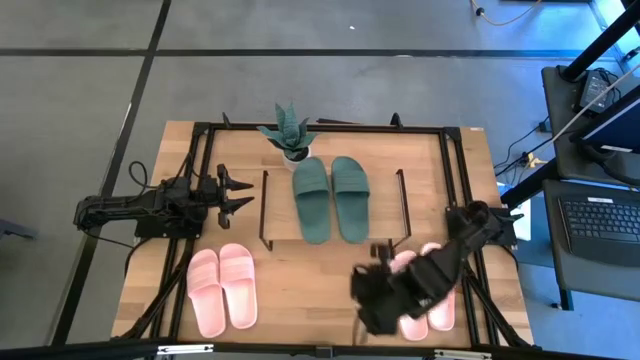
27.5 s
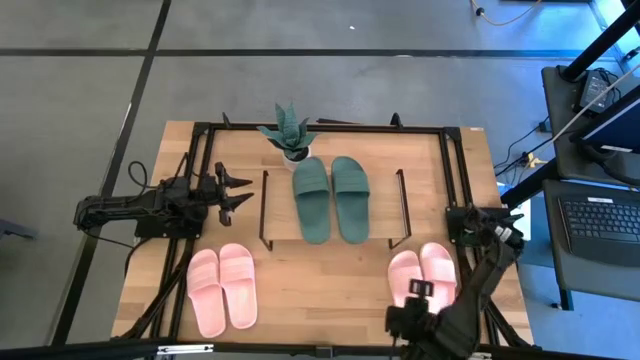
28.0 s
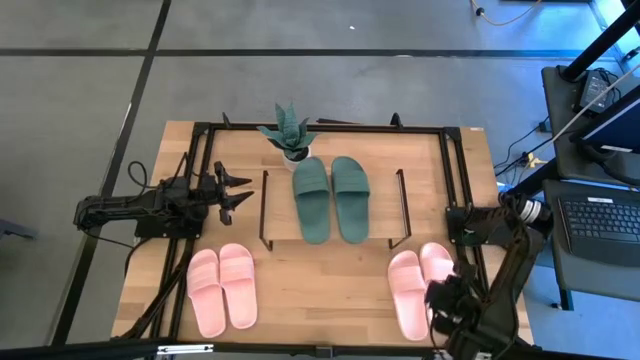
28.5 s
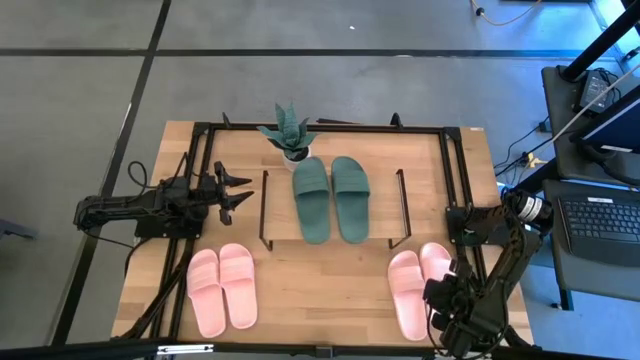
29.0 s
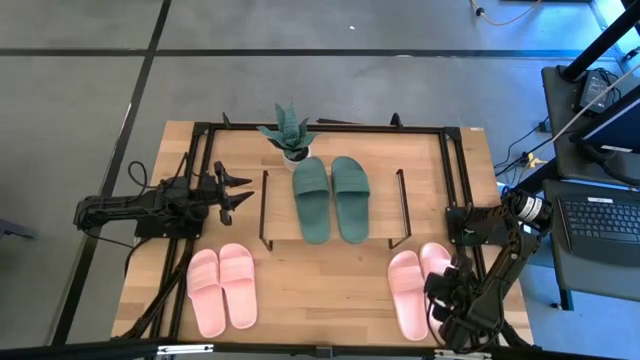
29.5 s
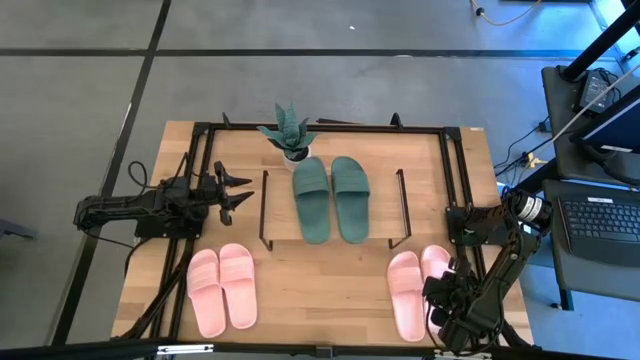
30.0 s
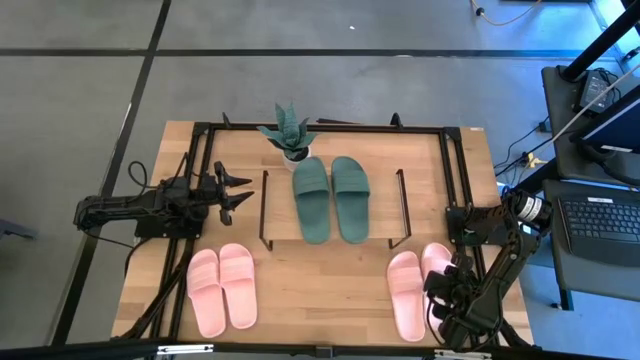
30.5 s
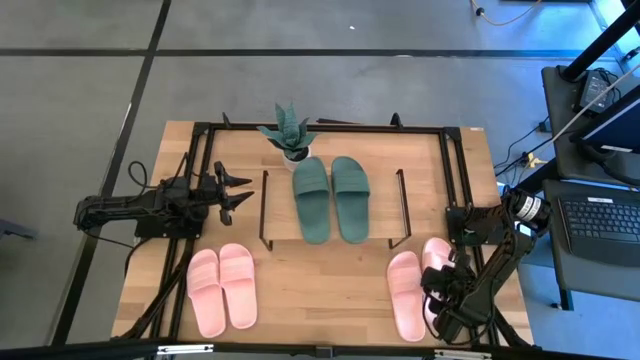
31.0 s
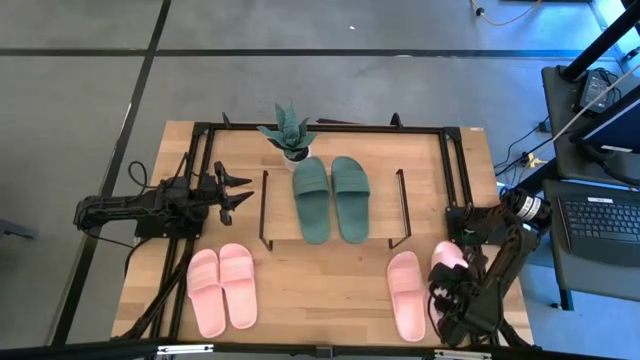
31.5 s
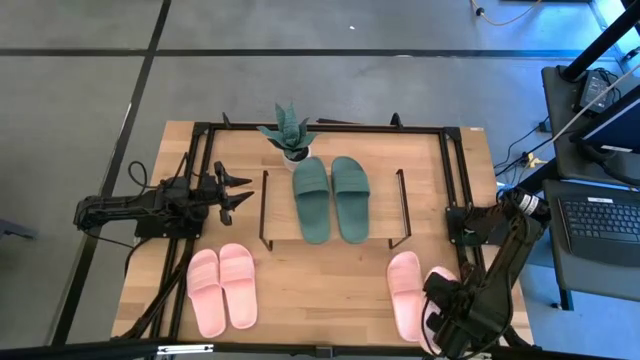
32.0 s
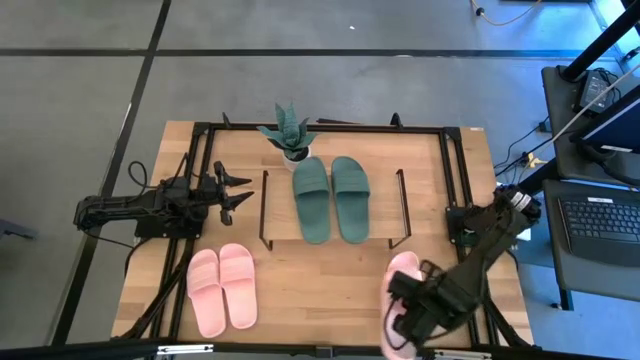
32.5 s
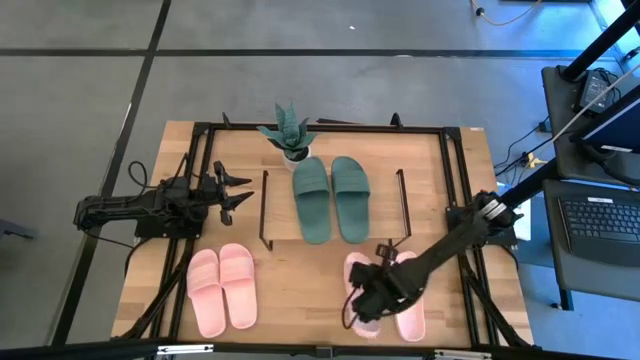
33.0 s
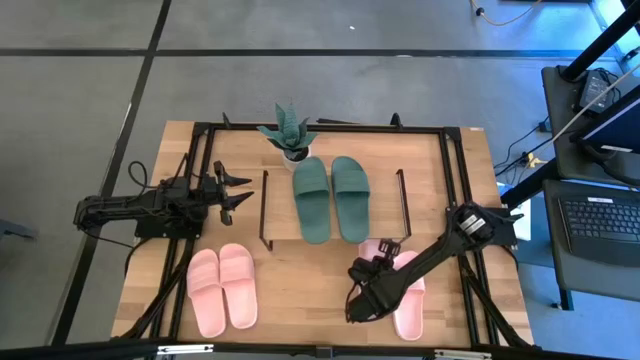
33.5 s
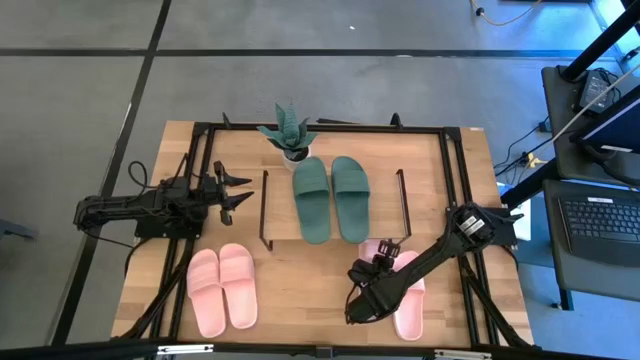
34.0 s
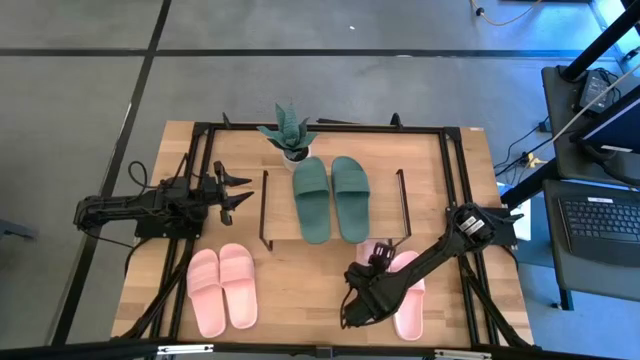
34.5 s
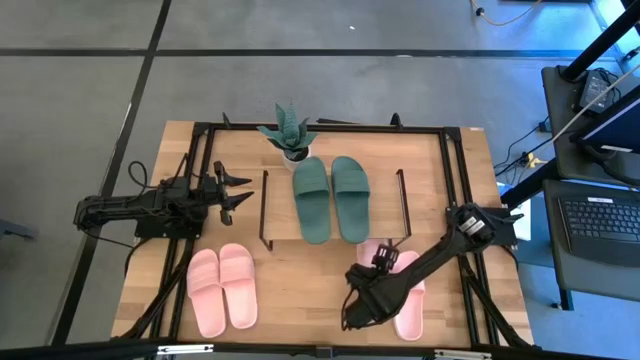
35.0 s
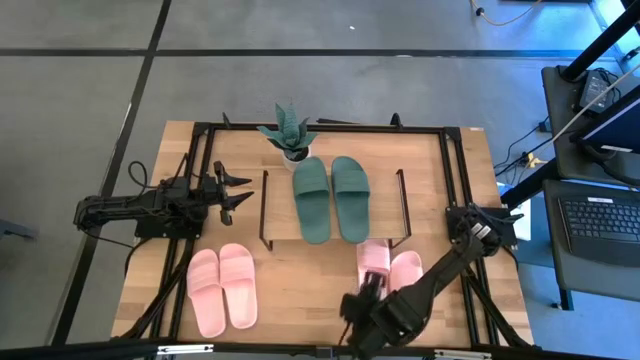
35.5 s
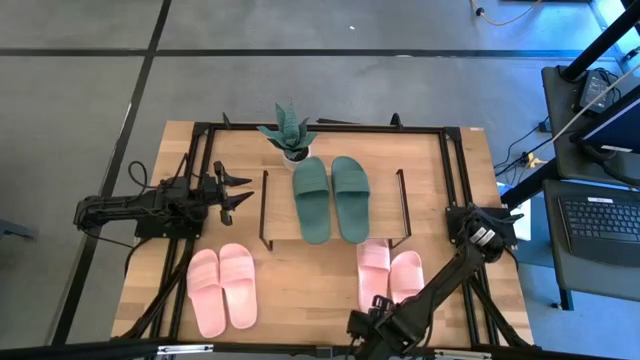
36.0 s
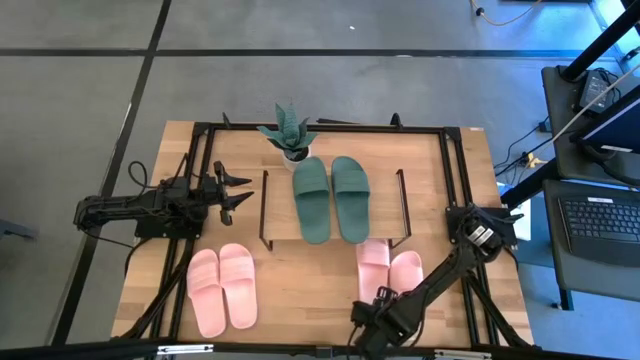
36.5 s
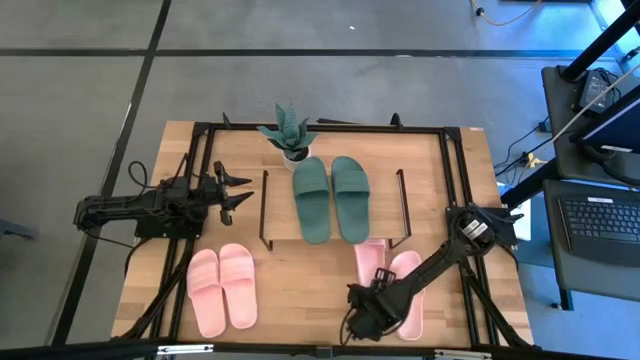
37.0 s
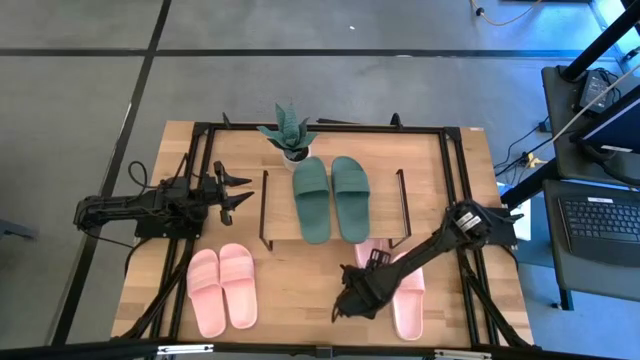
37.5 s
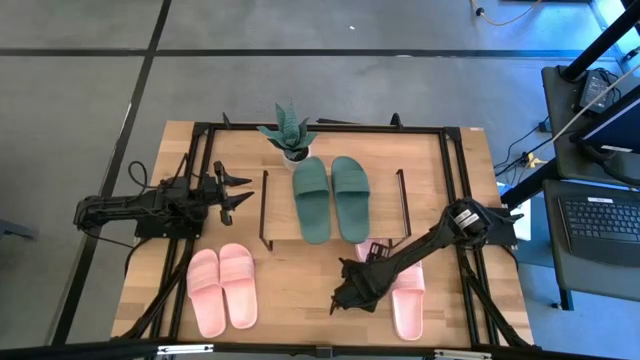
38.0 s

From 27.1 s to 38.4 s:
Task: Pick and place slides into the shelf
Put the right pink slide under the shelf

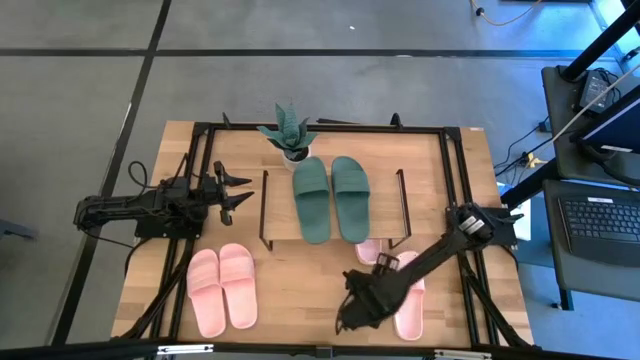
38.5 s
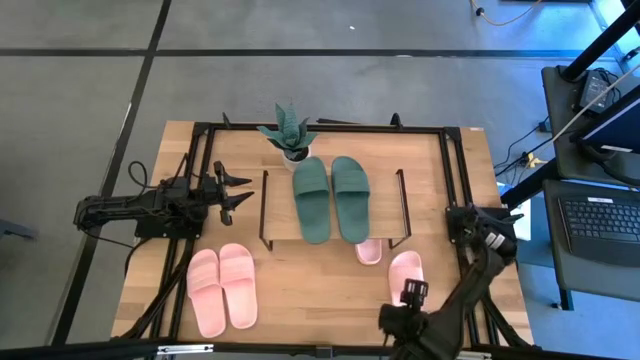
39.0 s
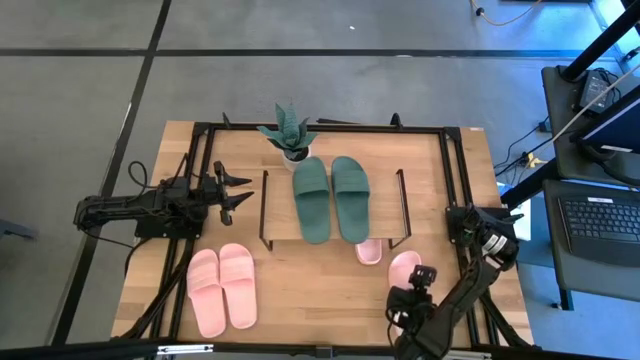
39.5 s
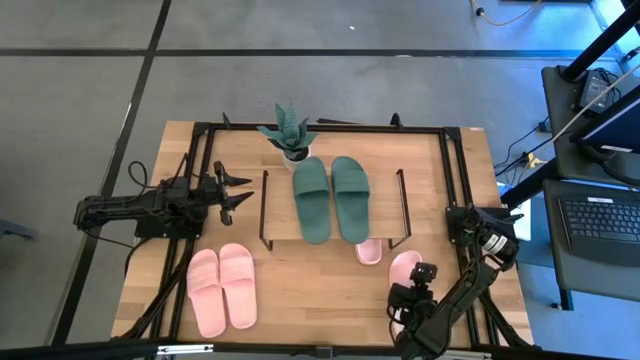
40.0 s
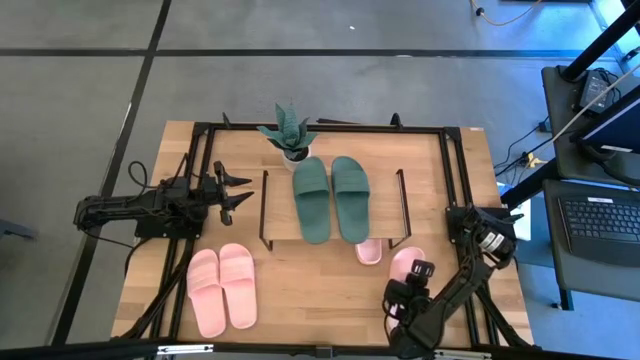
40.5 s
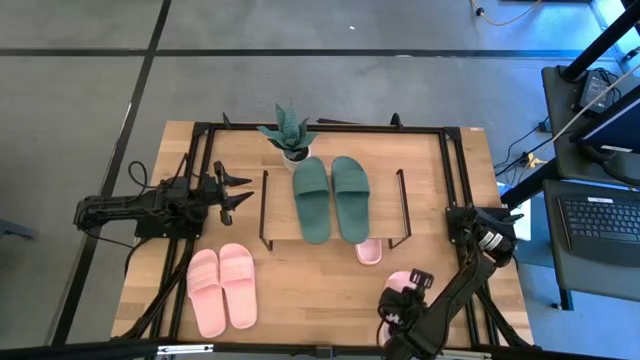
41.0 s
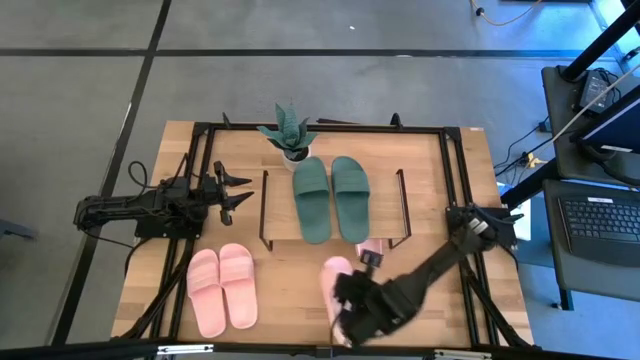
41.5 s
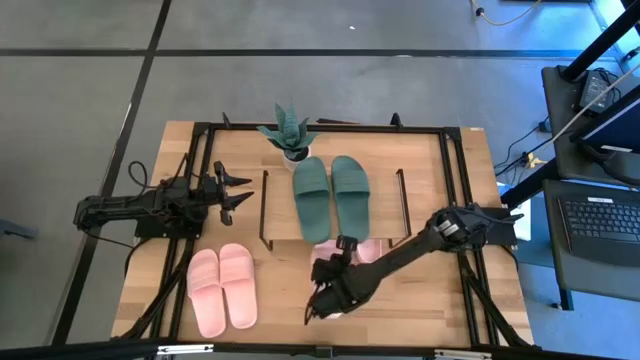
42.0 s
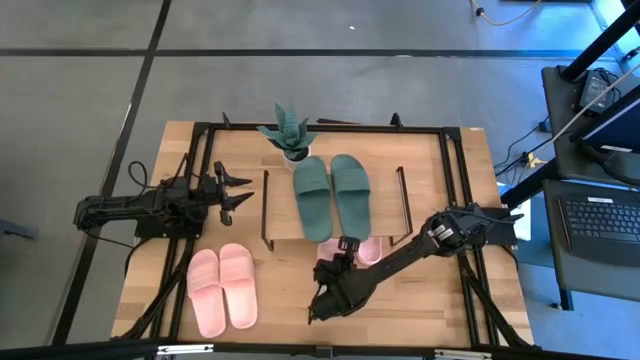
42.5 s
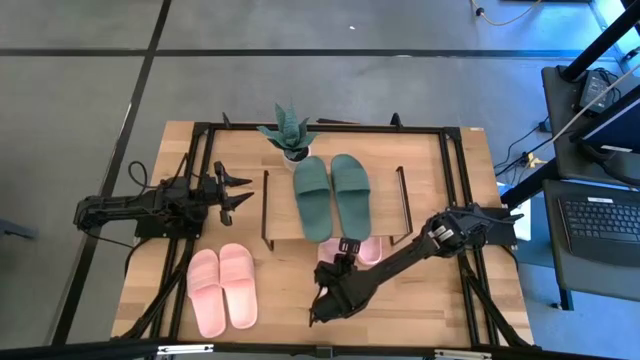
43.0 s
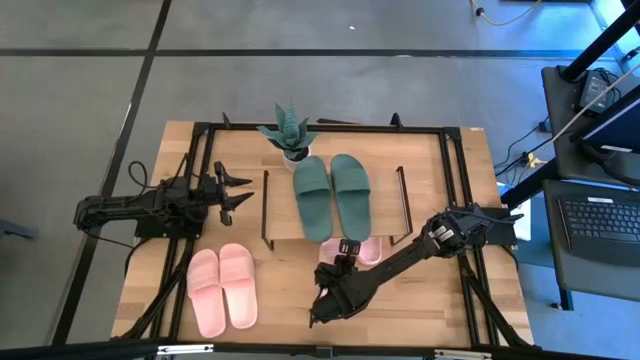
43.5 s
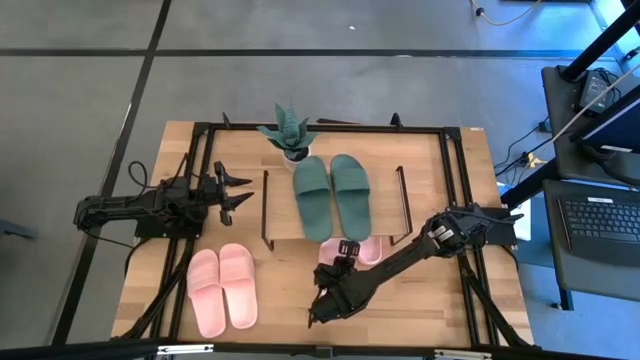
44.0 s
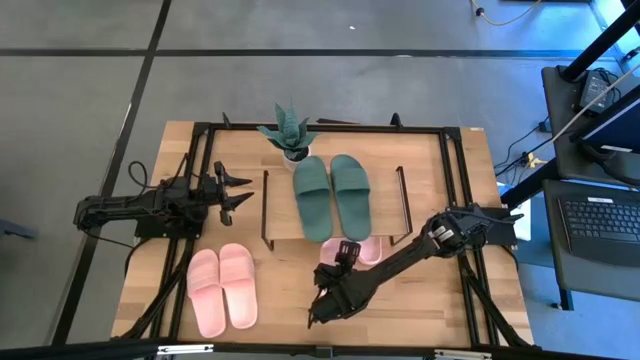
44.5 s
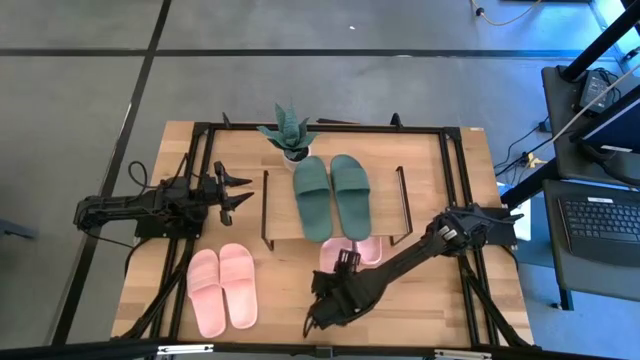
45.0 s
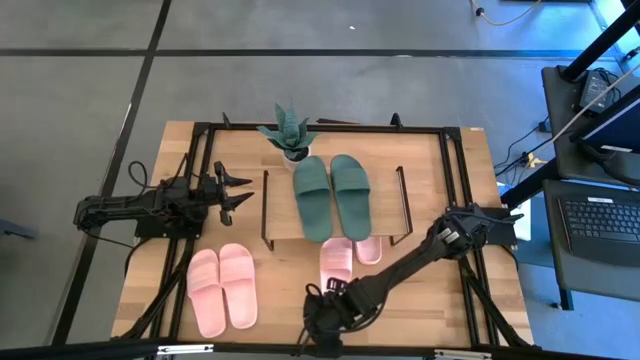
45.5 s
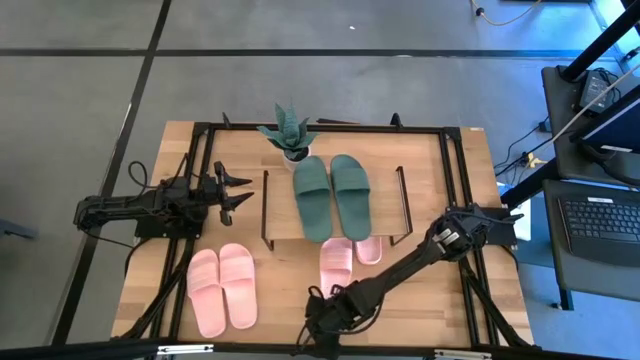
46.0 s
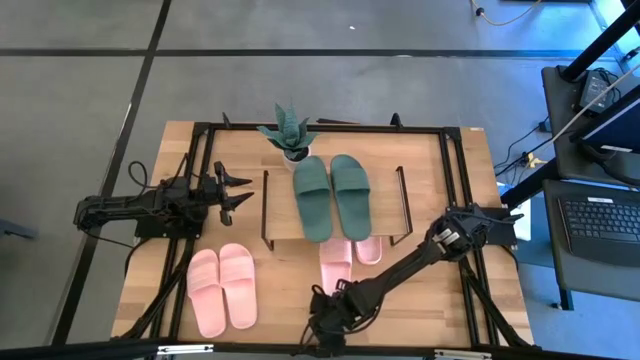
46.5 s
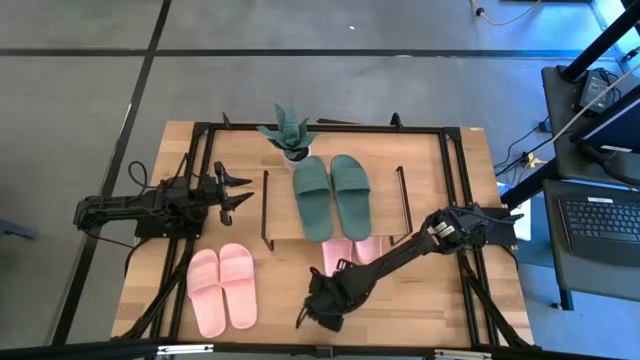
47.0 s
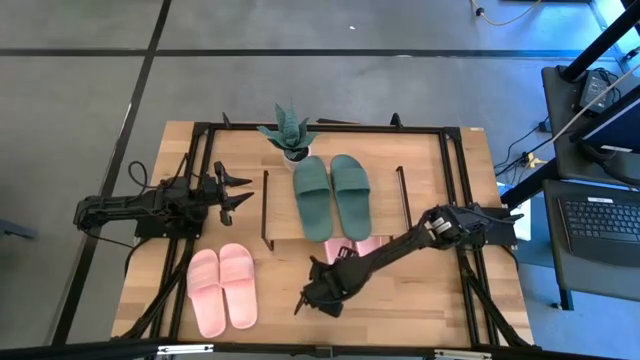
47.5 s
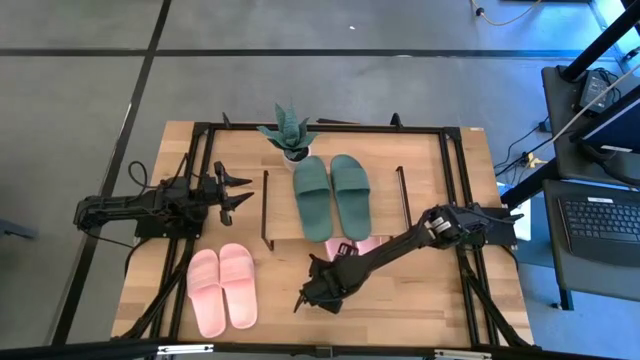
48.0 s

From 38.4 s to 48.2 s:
Put the right pink slide under the shelf

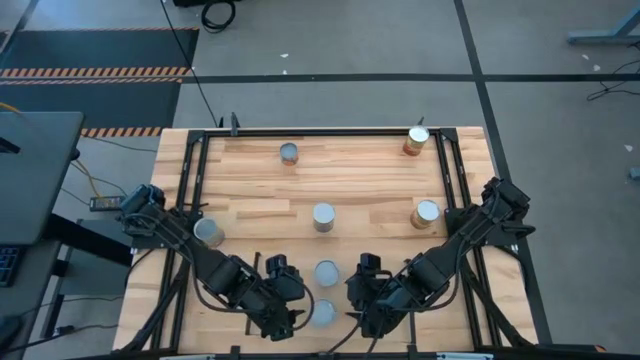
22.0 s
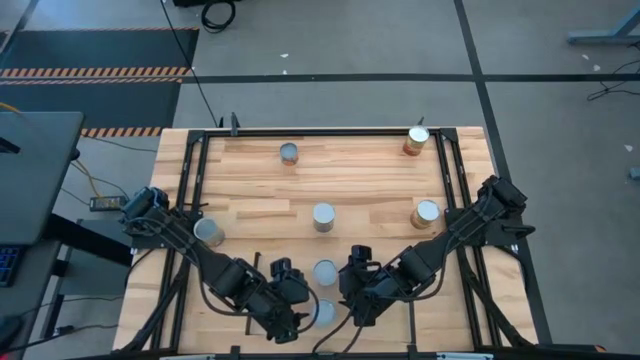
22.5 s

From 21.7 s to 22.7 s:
Task: Pick and place cans onto a shelf
Adjust the cans on the shelf
